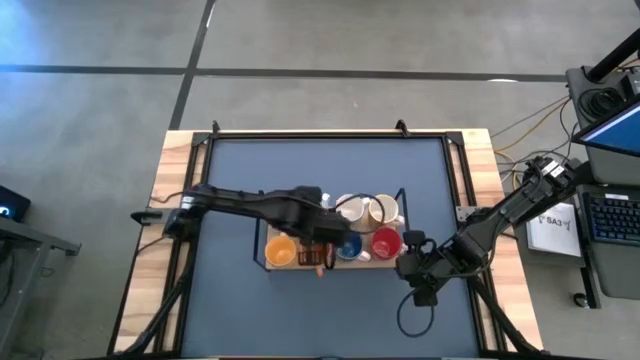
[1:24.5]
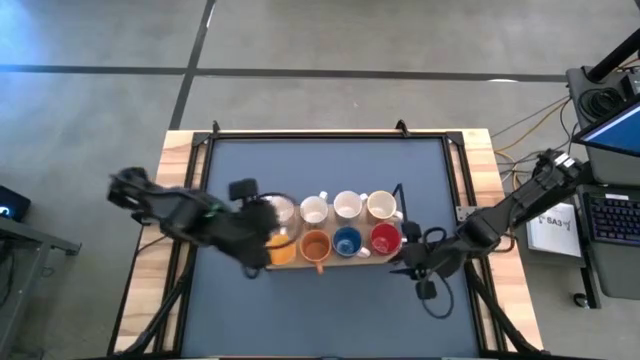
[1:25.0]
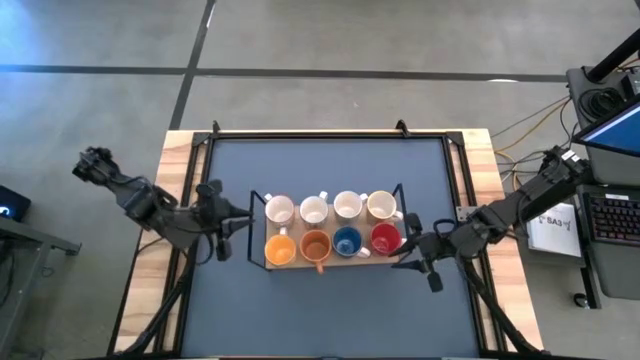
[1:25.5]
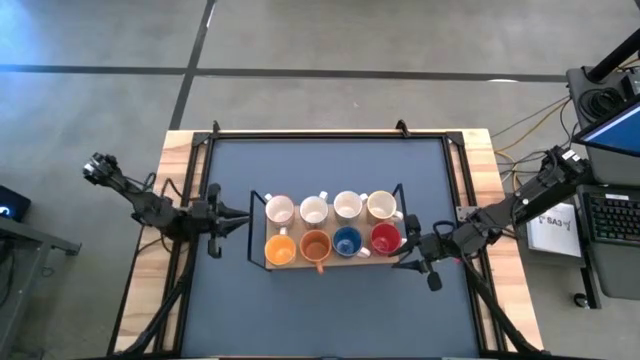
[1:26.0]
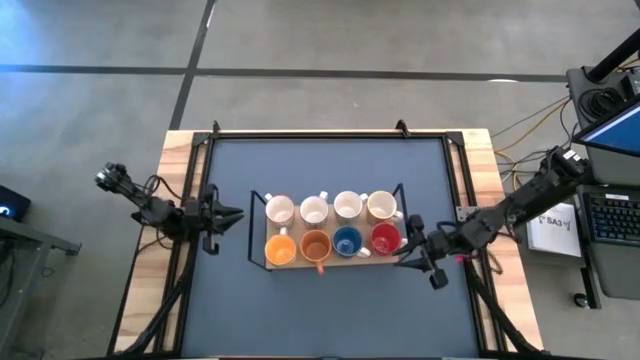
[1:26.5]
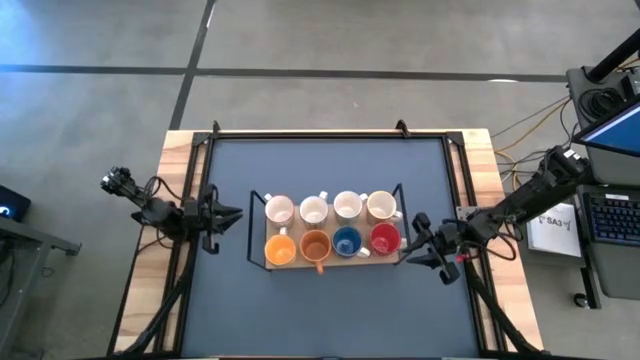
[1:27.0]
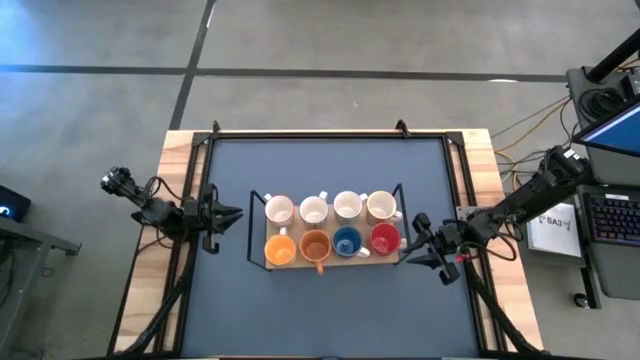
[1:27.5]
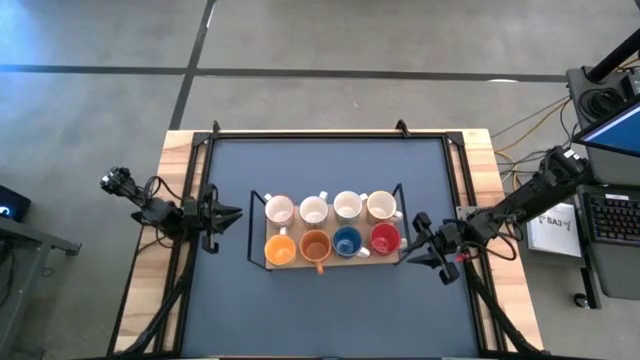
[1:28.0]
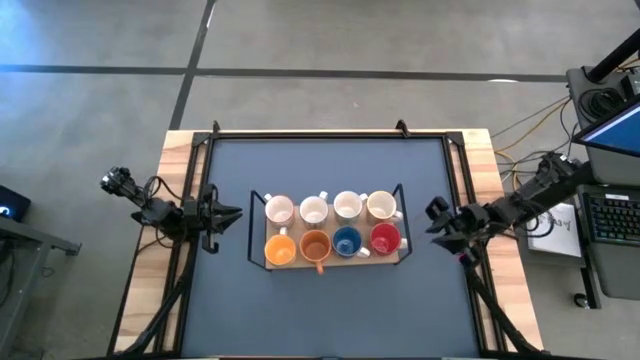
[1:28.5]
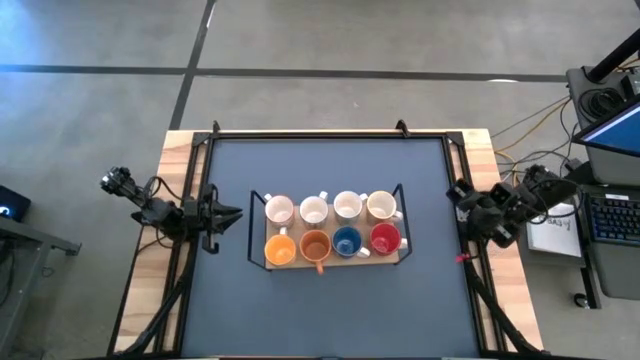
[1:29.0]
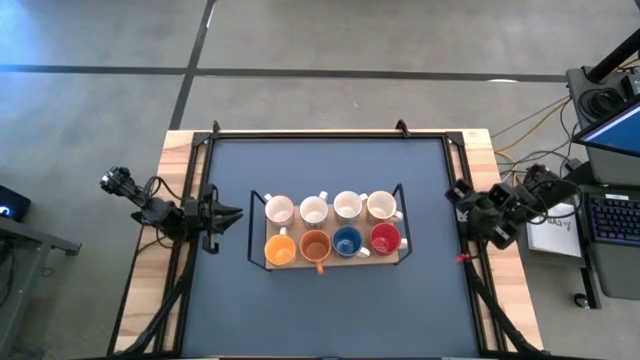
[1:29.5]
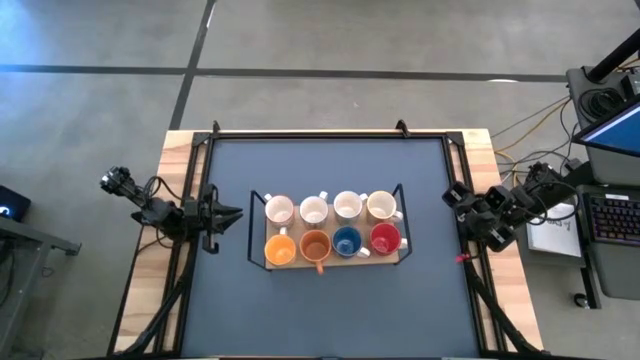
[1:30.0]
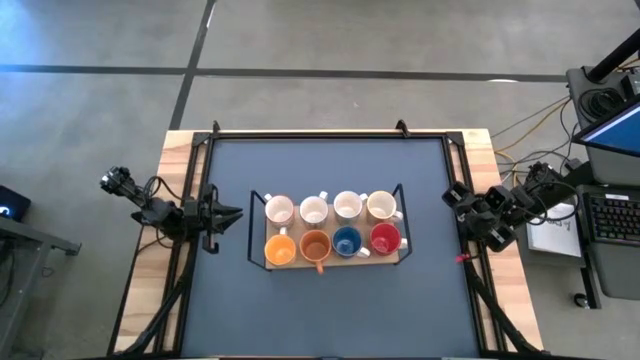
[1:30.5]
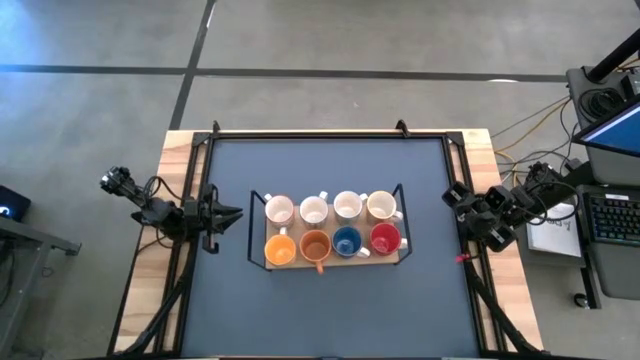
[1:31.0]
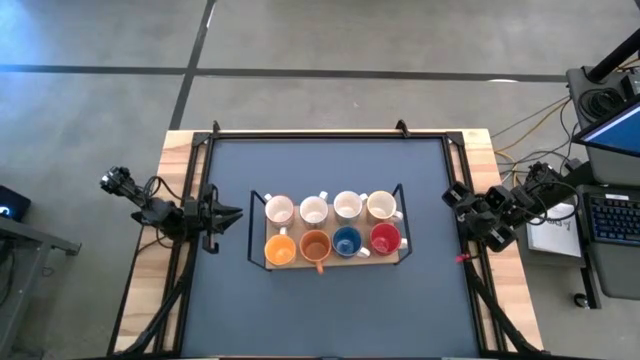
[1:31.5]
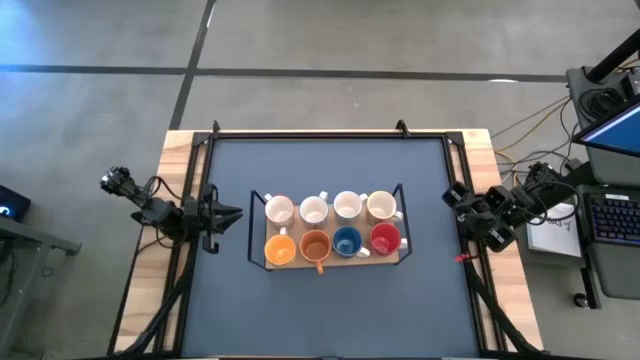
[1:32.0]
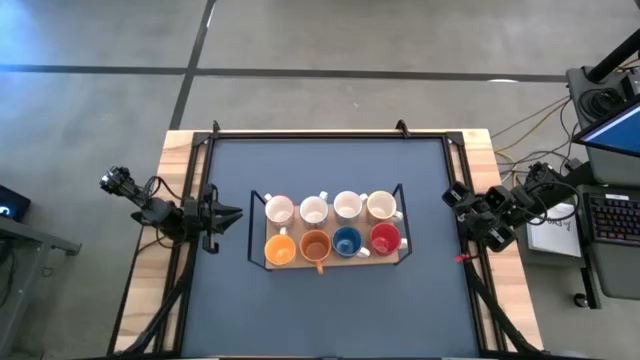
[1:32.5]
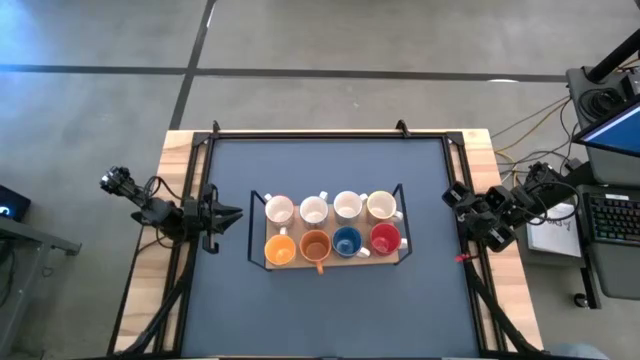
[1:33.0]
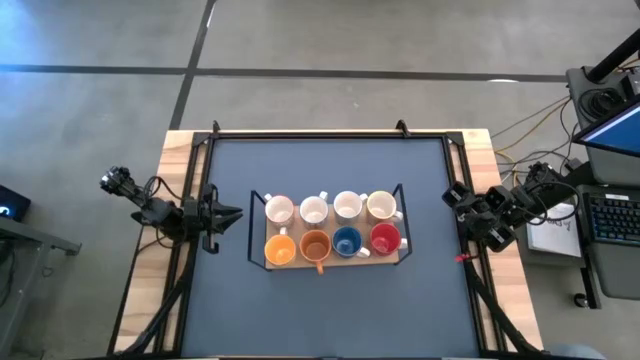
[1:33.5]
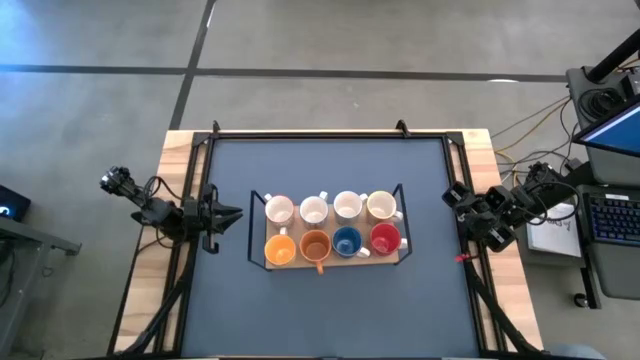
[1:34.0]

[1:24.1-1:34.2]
Task: Place coffee mugs
Return to Home Position

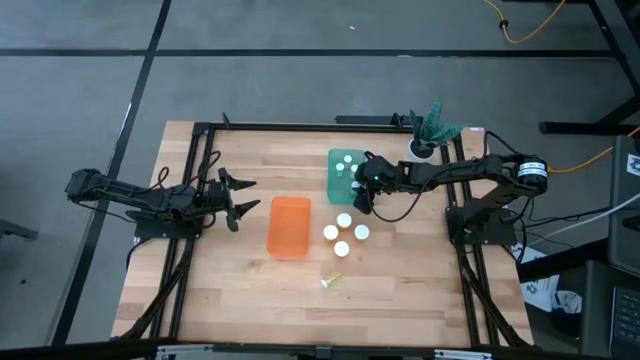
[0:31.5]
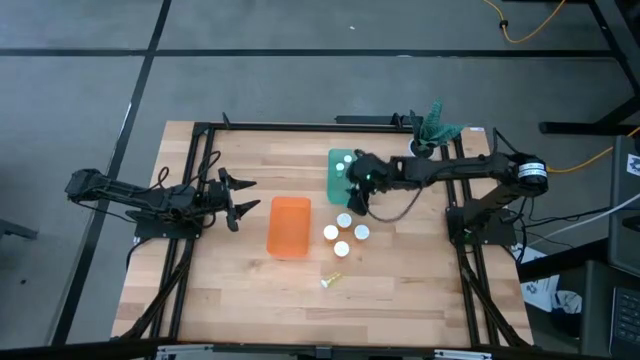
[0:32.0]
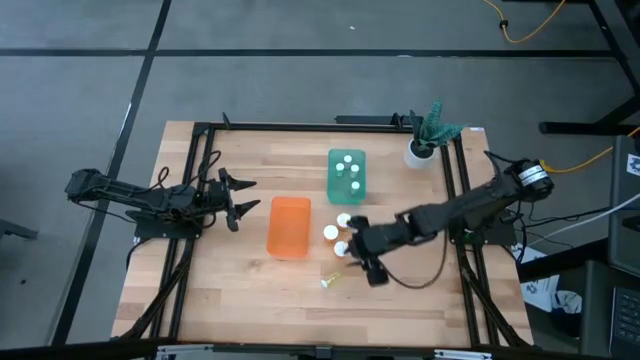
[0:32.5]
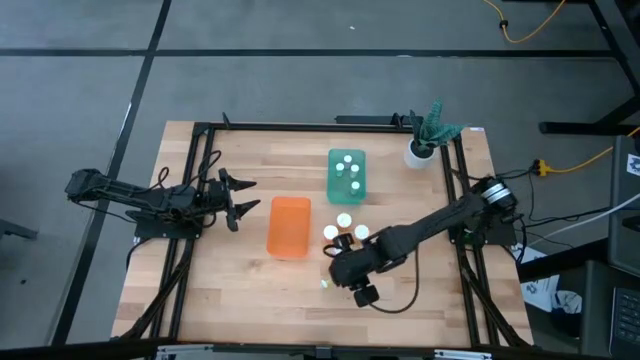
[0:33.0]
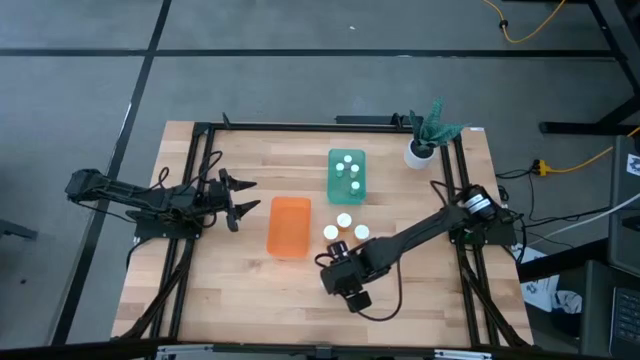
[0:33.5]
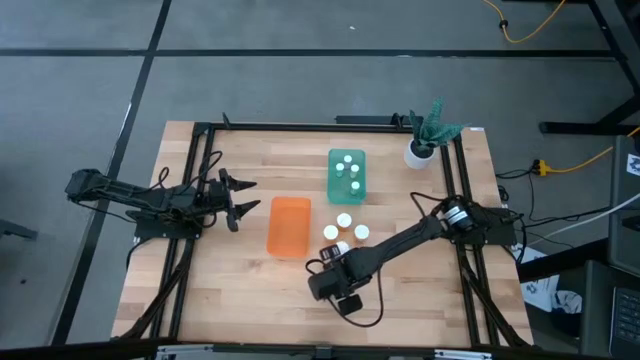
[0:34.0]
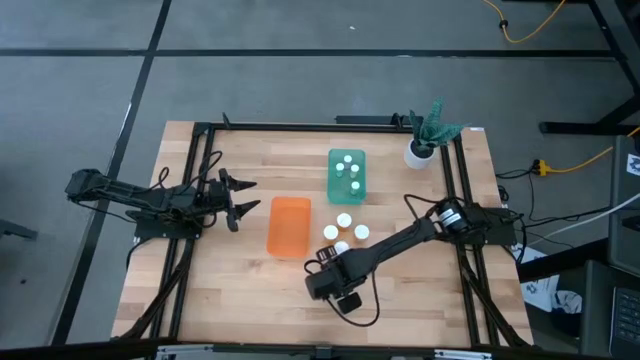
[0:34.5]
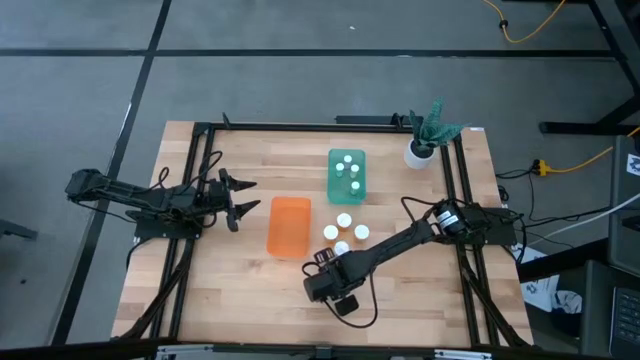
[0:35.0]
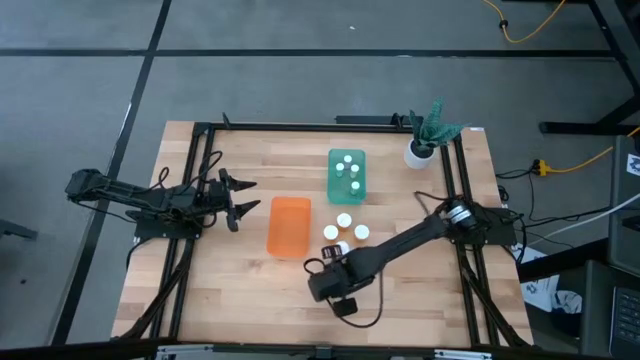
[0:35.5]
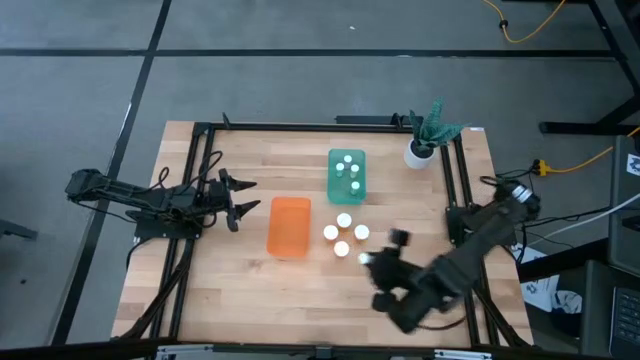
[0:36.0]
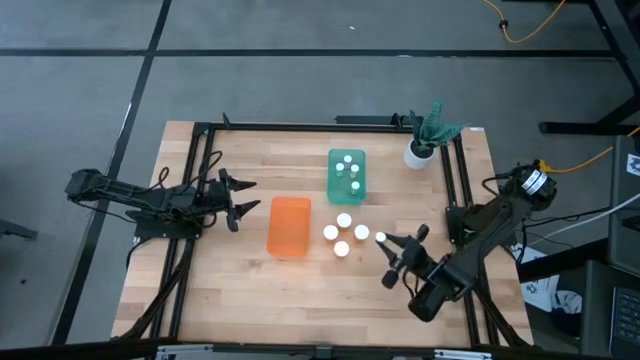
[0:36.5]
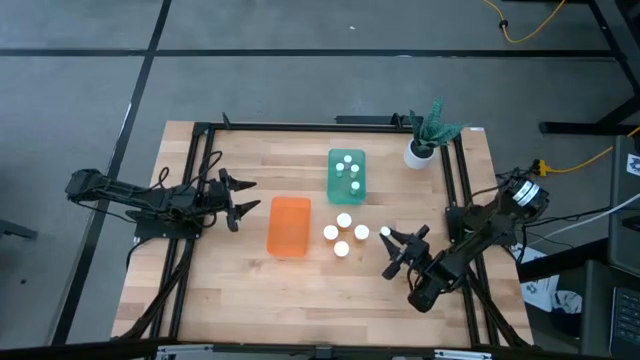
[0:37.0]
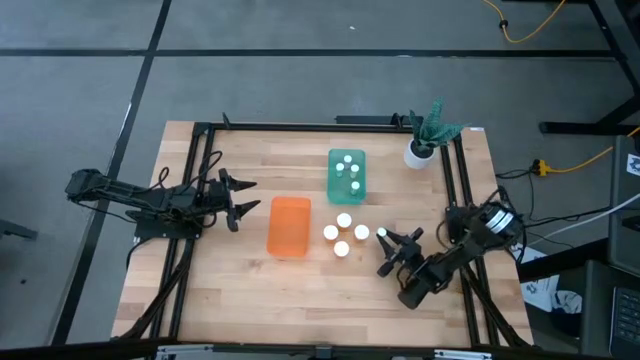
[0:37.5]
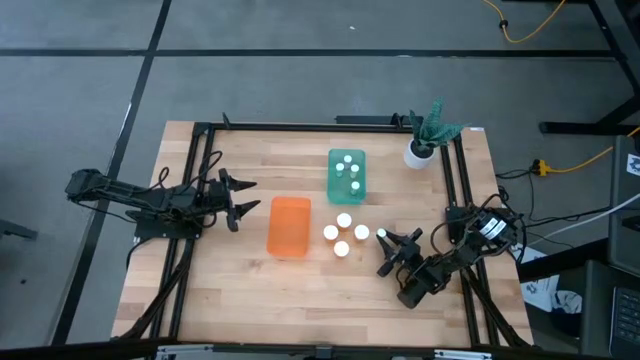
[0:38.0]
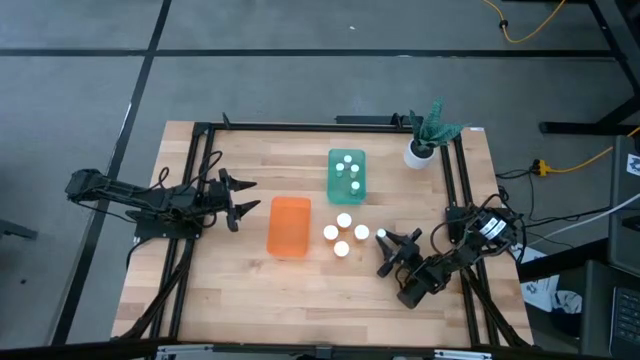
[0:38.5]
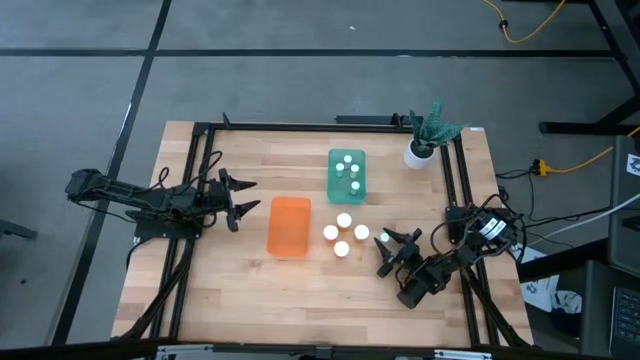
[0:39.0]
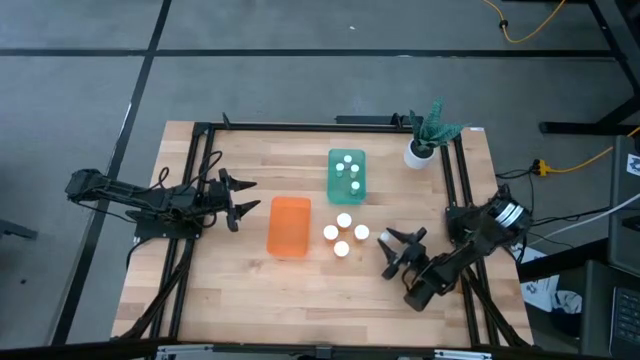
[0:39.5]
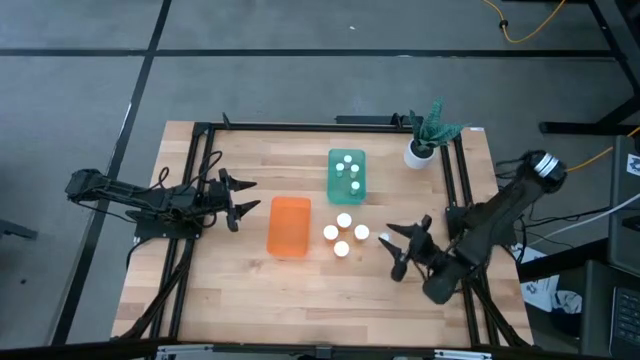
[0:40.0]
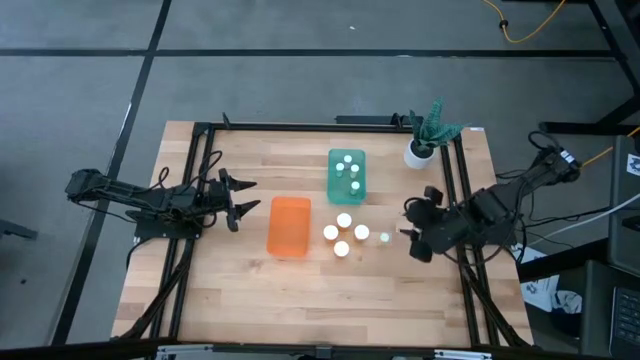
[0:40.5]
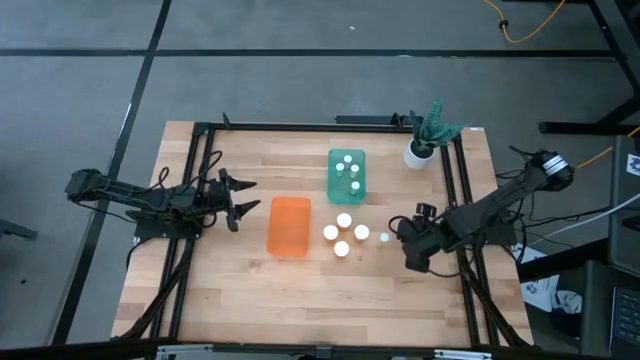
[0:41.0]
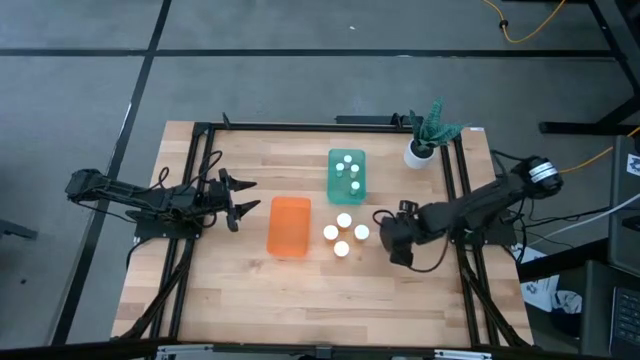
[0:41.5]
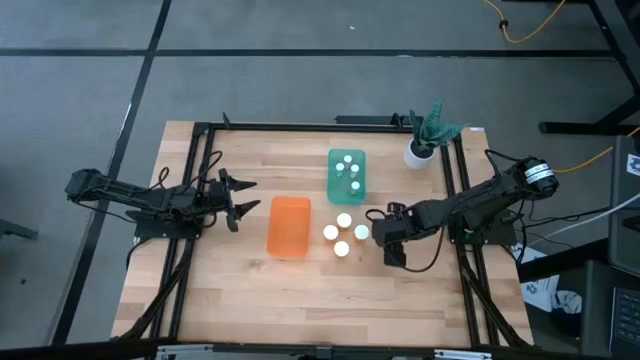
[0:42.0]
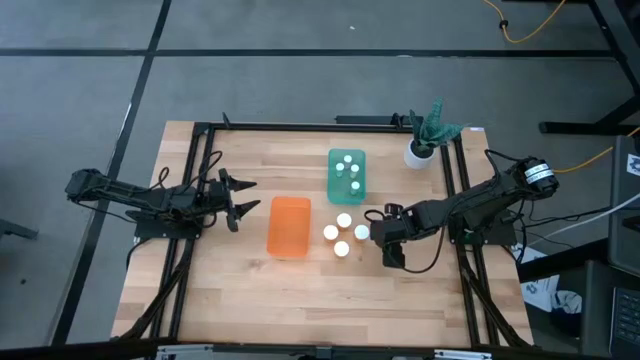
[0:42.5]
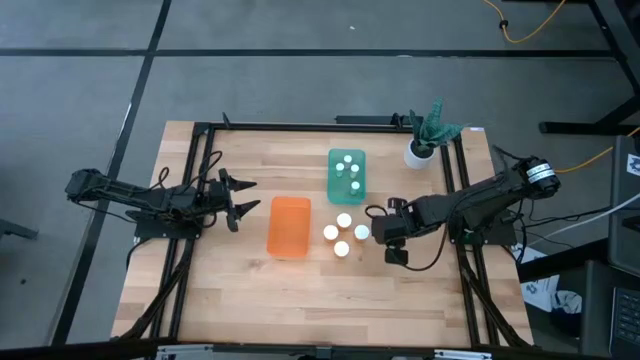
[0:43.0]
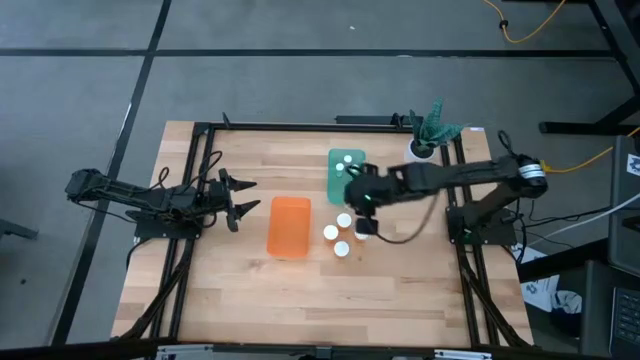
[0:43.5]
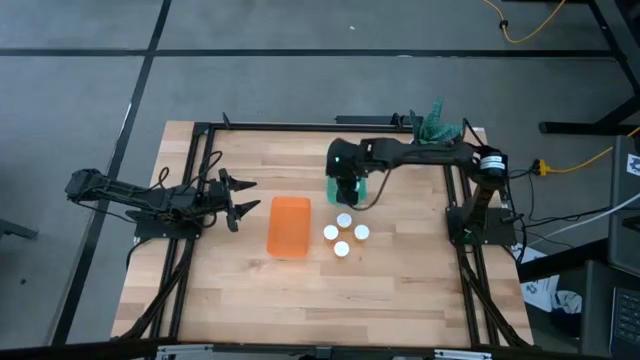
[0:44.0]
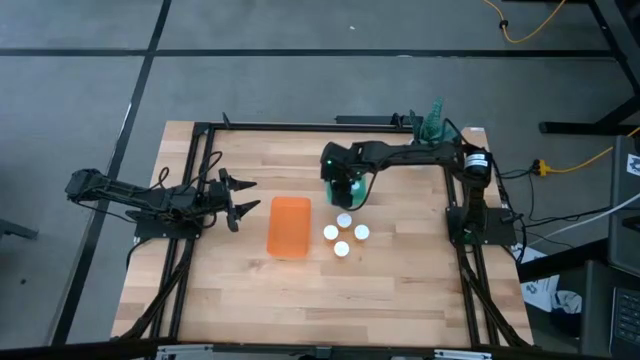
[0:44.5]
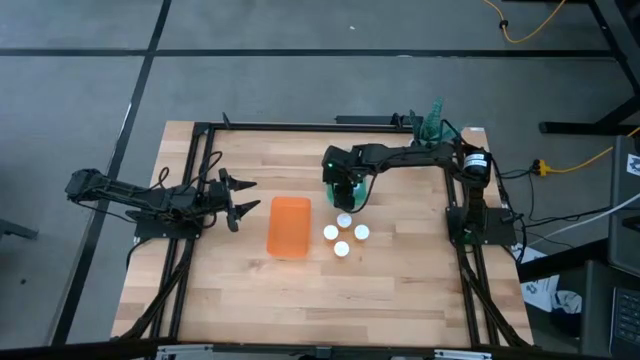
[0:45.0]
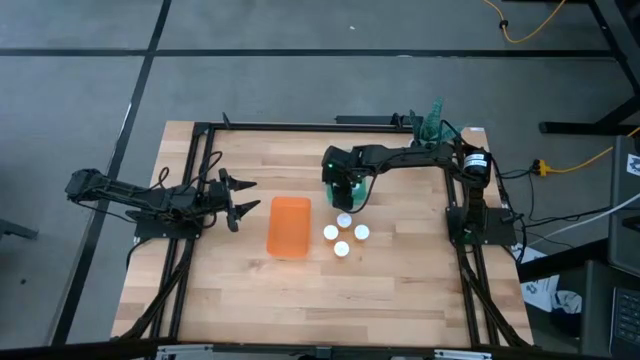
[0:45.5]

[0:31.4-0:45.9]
Task: Pick and place medicine bottles into bin by pill shape (circle, oval)
Put the small yellow medicine bottle into the blue bin
